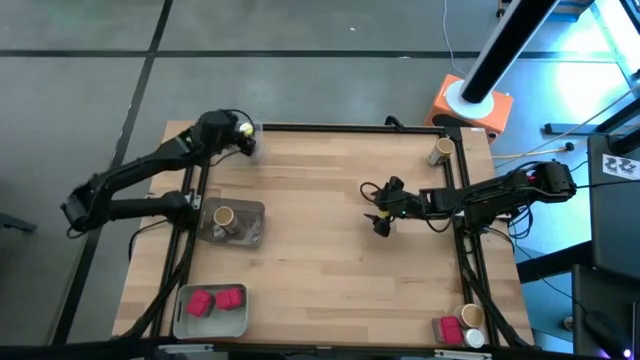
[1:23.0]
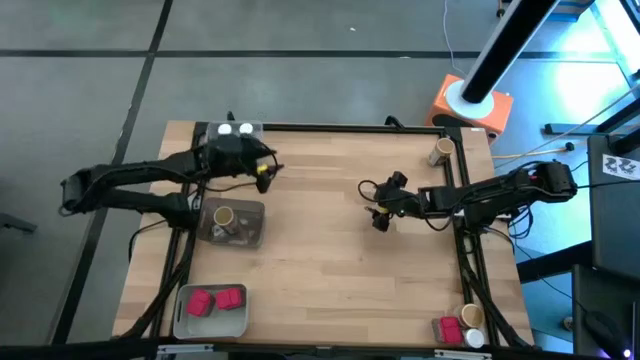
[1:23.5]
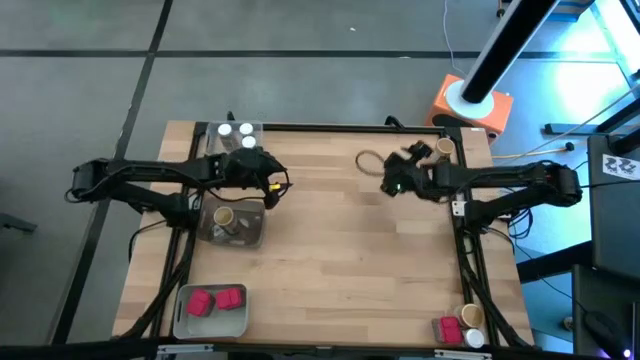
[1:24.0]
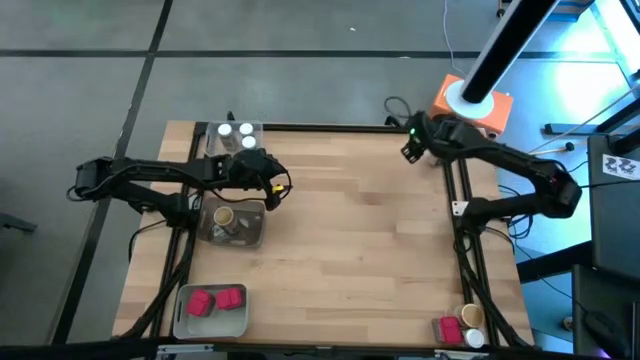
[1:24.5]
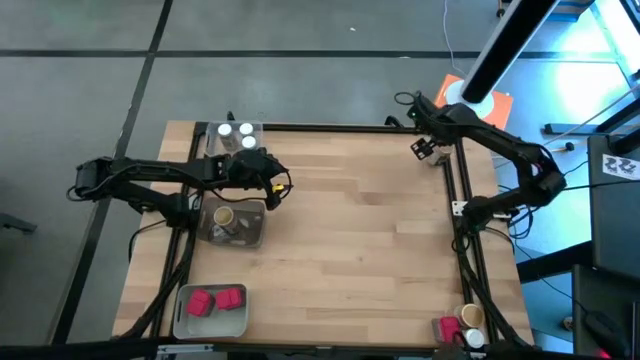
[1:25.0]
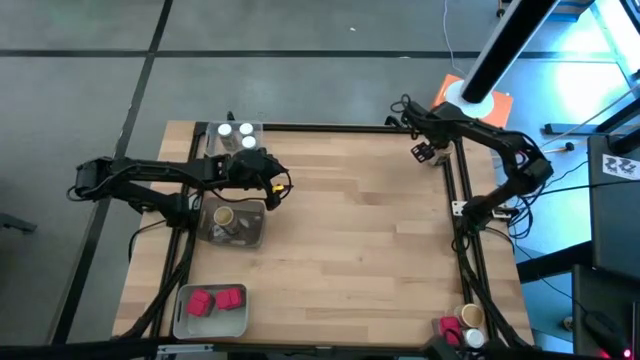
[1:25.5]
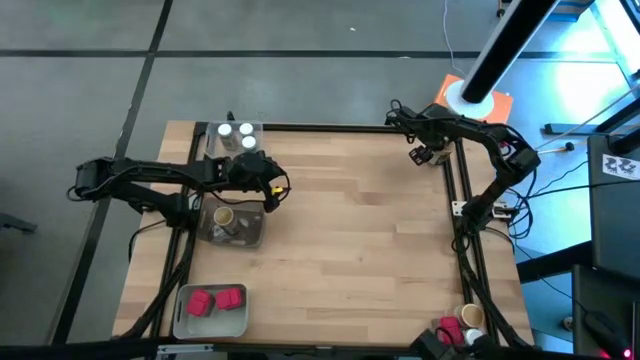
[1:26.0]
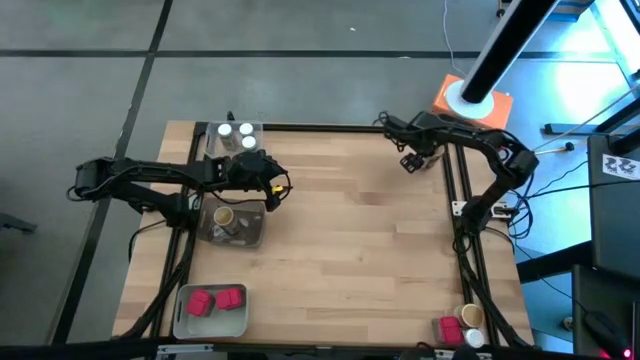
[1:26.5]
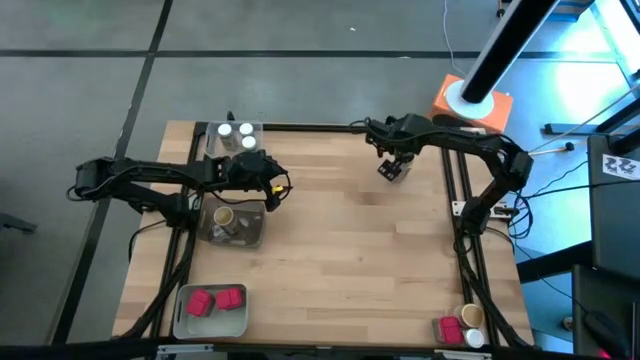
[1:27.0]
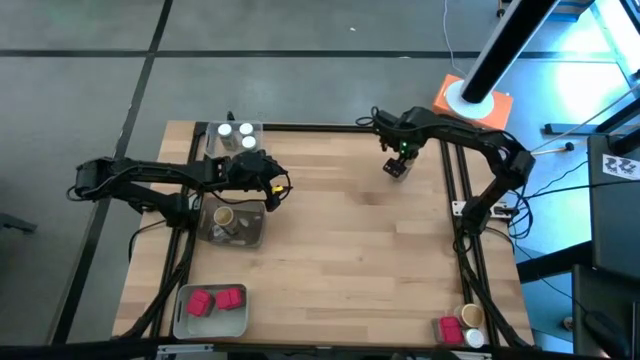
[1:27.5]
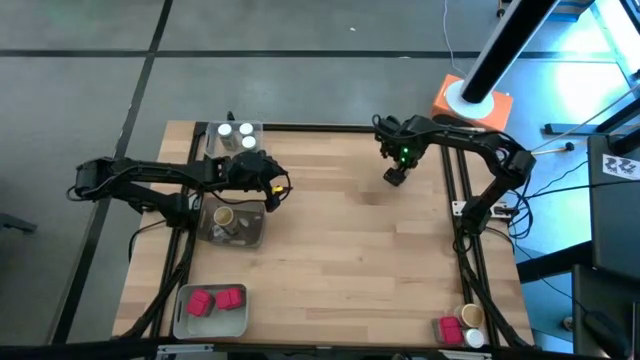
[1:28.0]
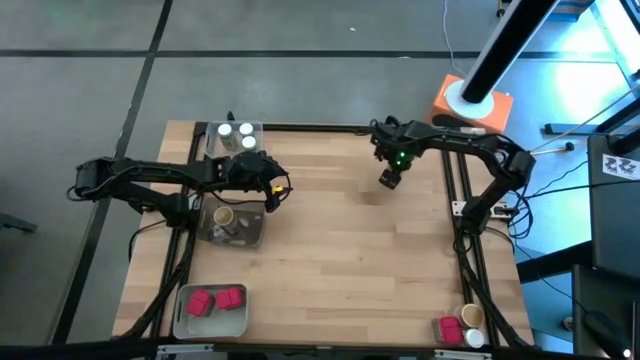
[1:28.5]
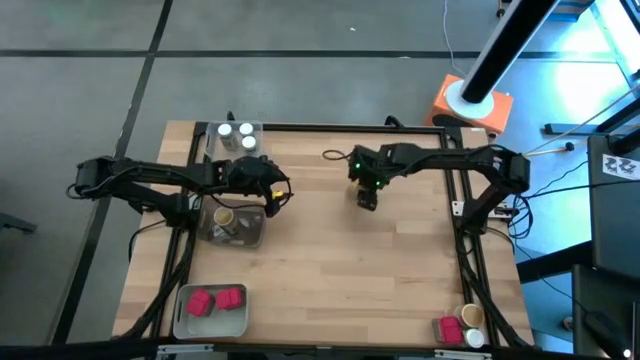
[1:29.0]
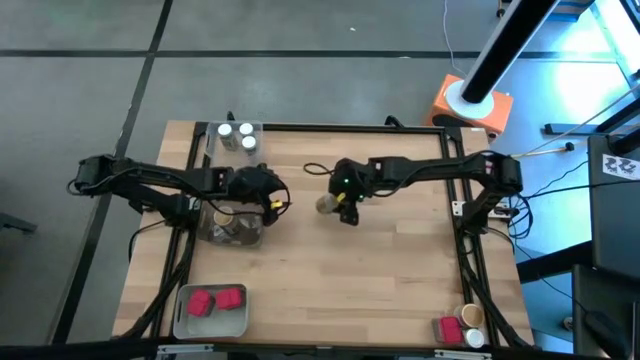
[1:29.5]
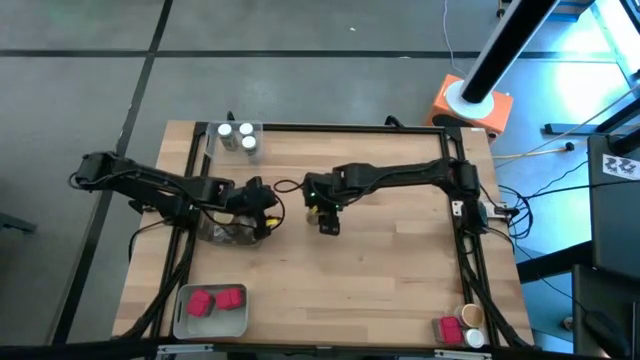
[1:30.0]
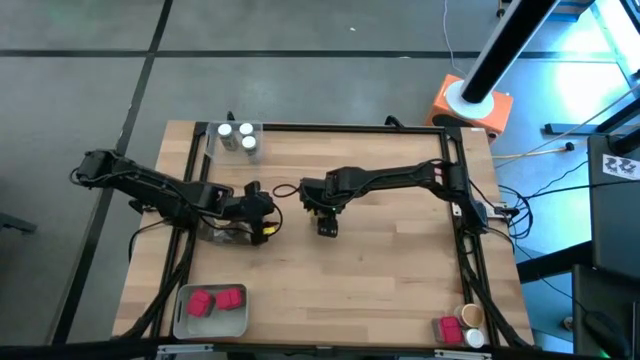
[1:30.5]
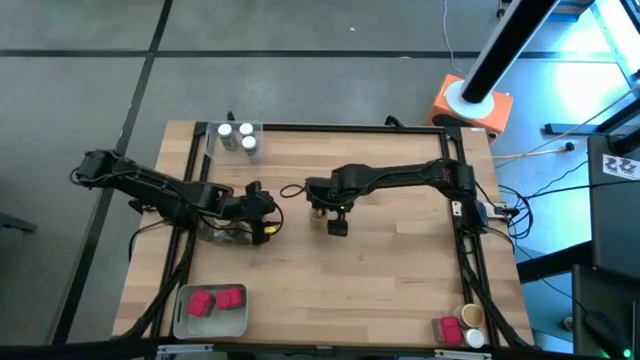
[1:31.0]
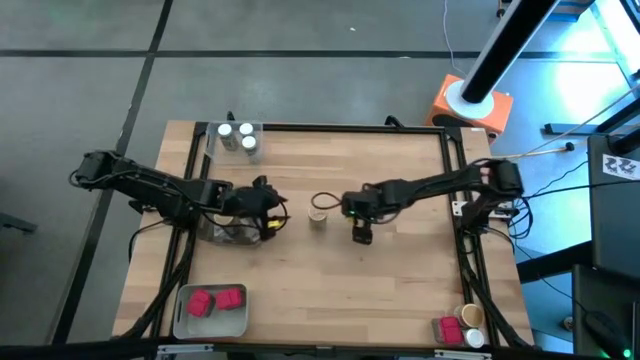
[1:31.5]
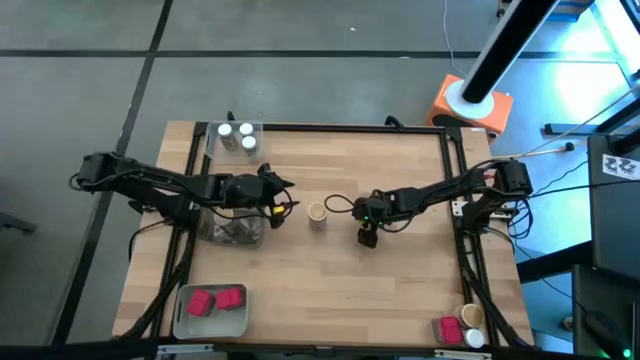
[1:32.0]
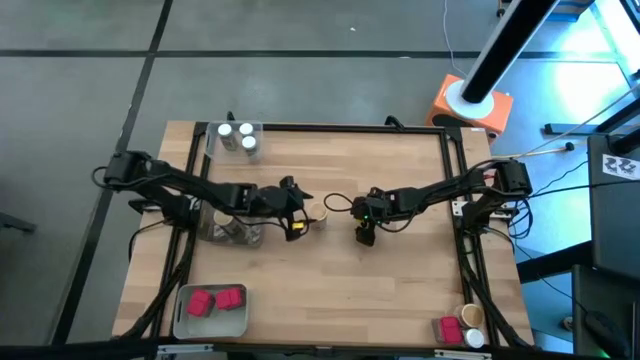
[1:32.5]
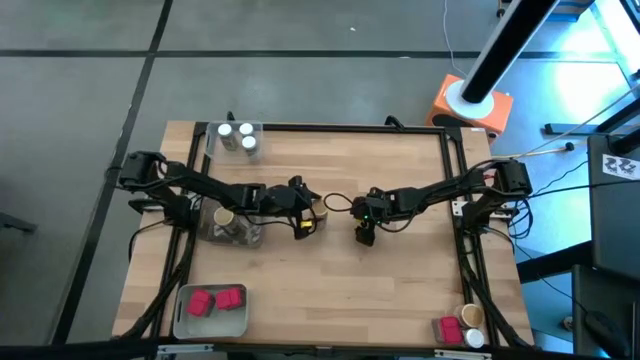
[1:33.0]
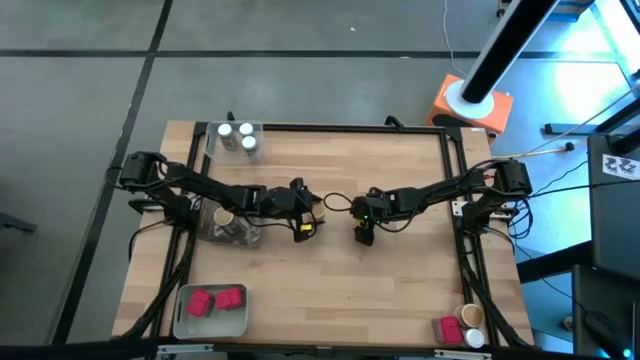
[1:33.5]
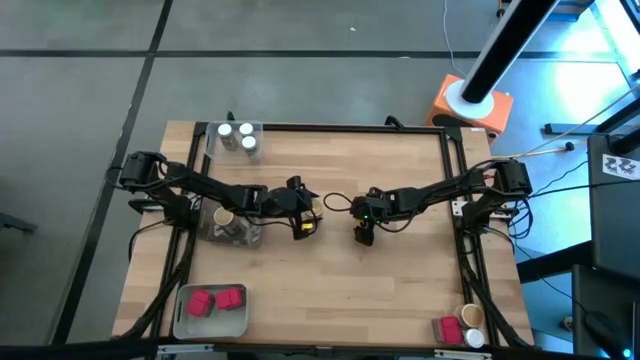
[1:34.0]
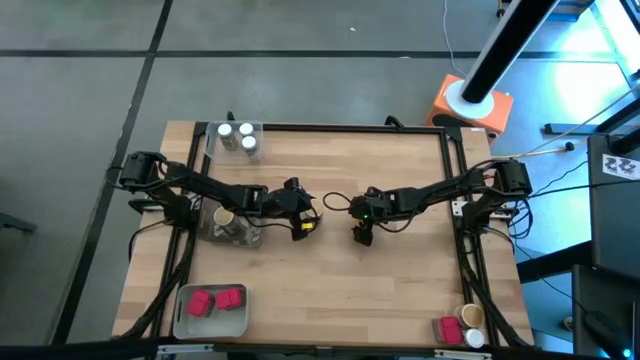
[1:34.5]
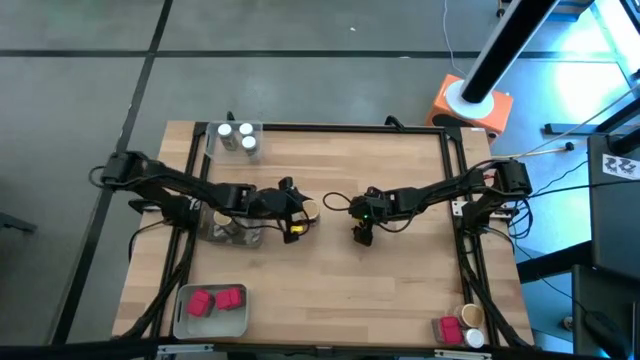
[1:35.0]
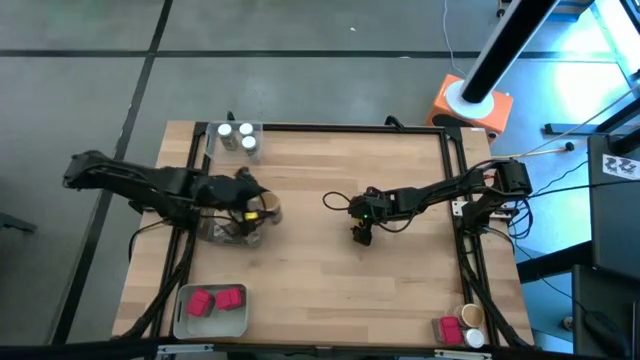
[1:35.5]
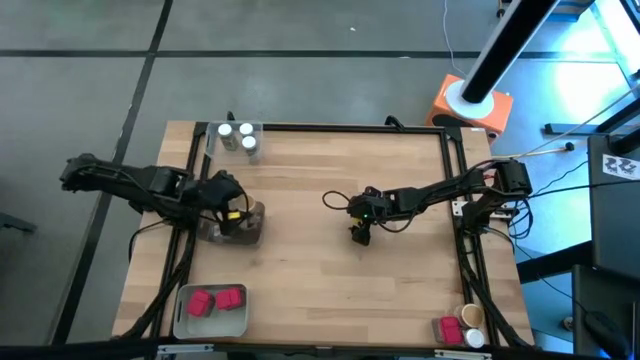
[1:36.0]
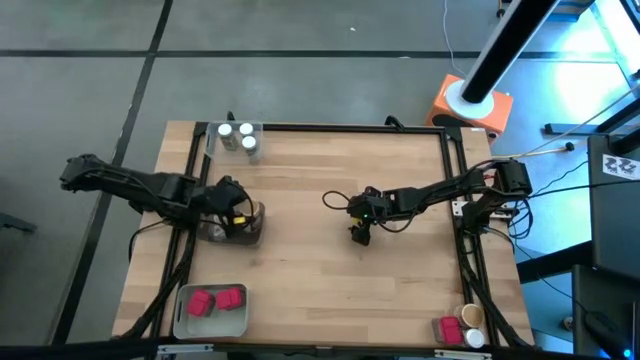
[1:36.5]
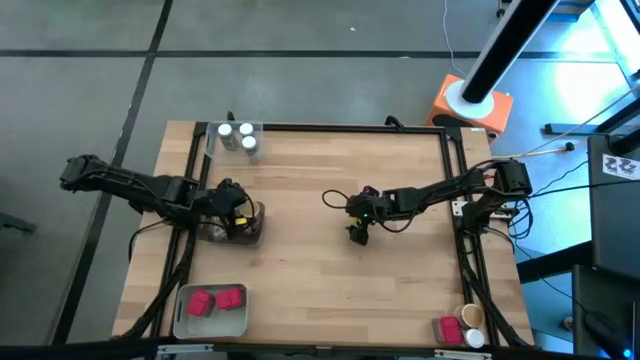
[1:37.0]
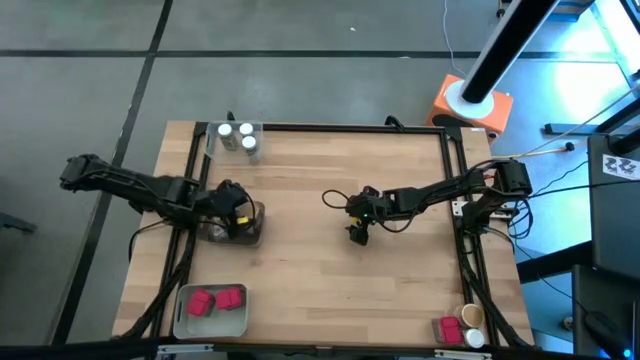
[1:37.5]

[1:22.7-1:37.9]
Task: Sort spices by type
Put the top brown spice bottle into the black bin

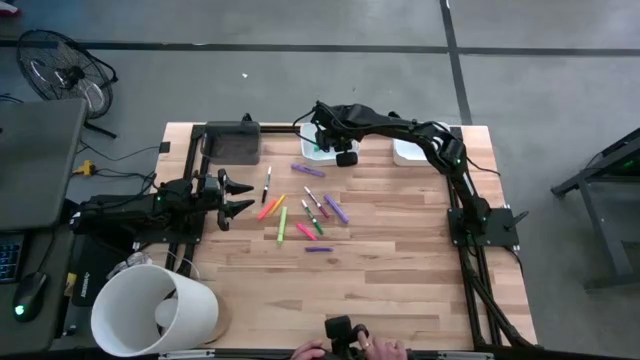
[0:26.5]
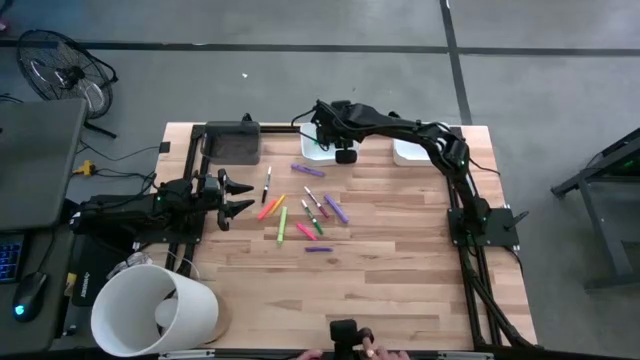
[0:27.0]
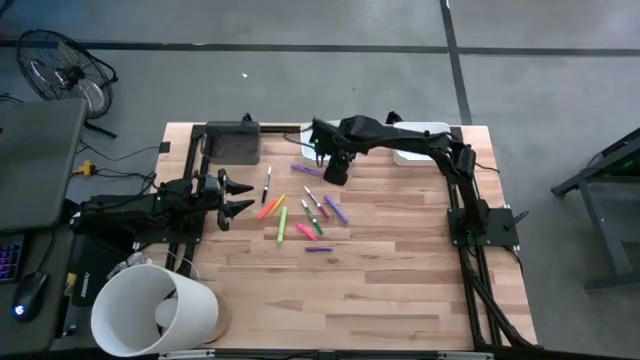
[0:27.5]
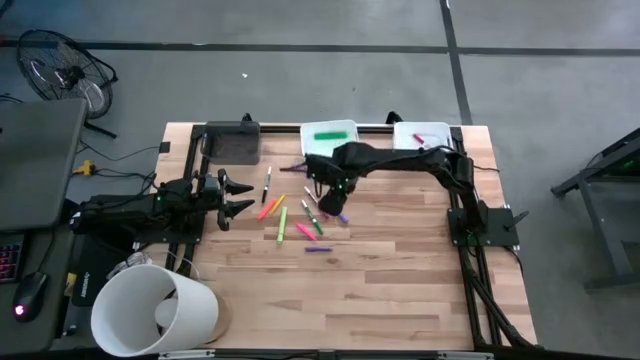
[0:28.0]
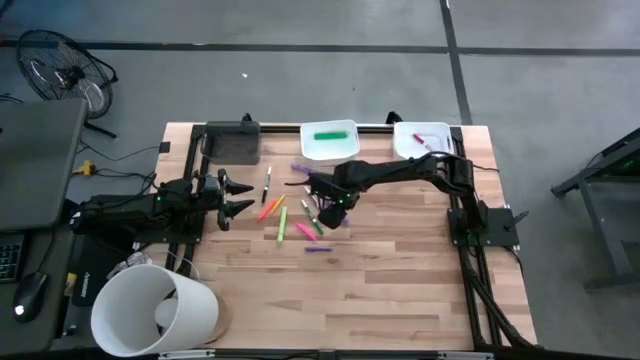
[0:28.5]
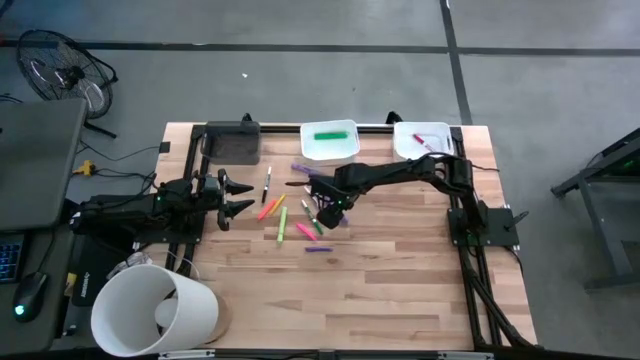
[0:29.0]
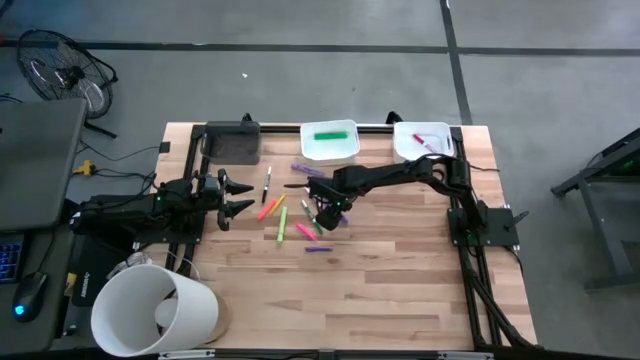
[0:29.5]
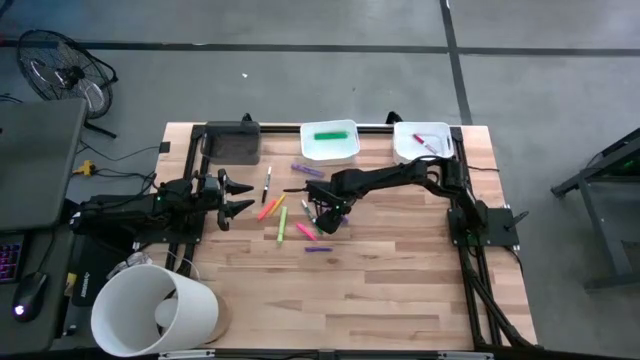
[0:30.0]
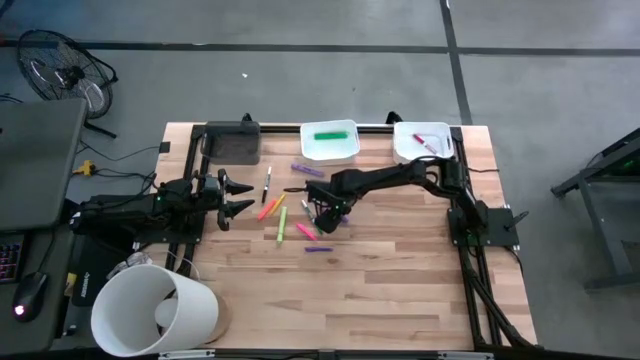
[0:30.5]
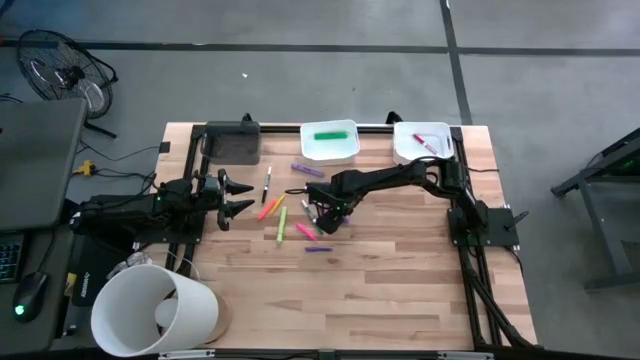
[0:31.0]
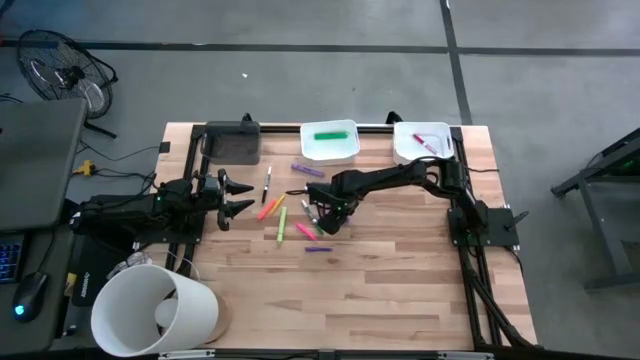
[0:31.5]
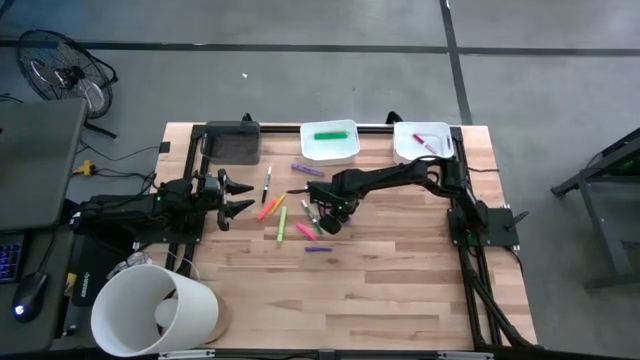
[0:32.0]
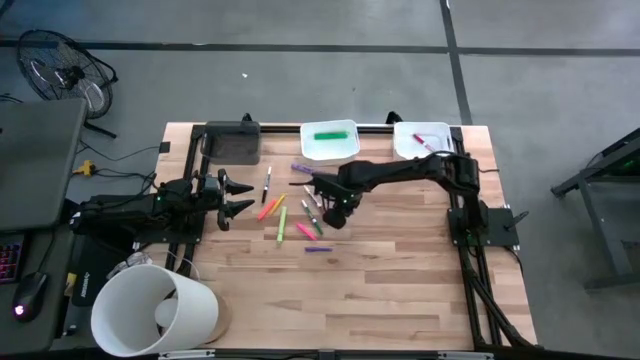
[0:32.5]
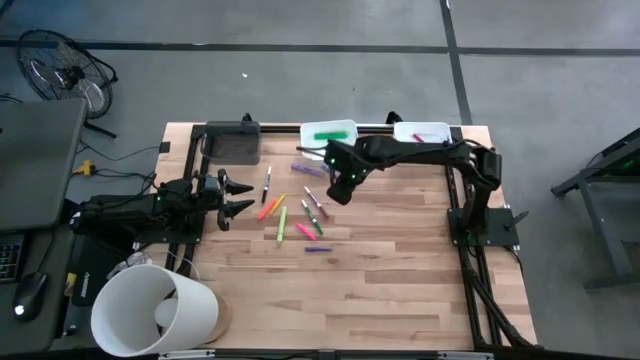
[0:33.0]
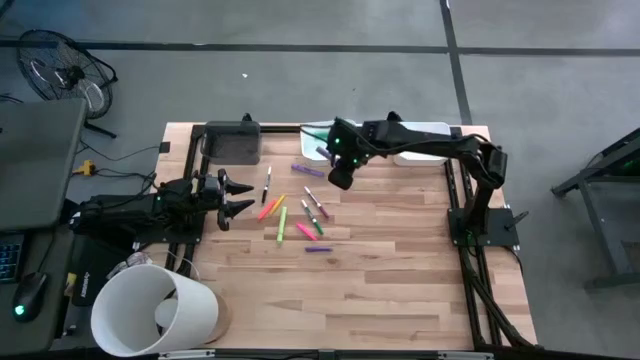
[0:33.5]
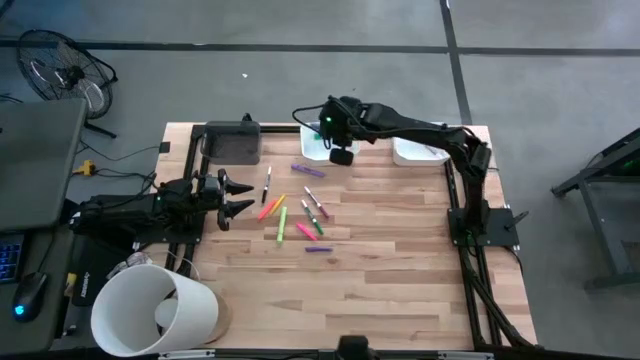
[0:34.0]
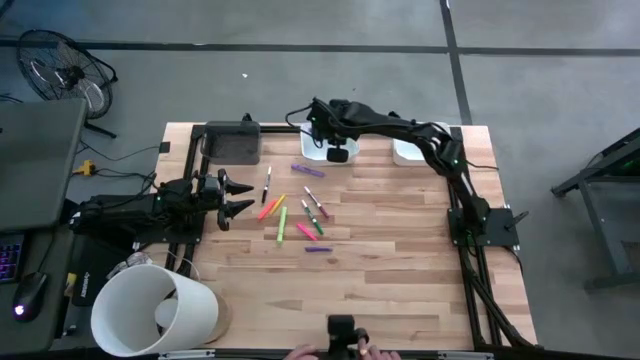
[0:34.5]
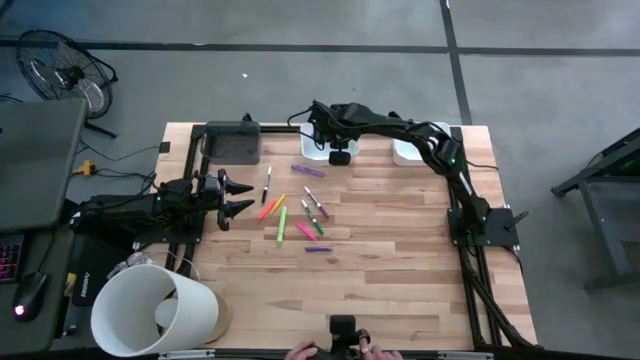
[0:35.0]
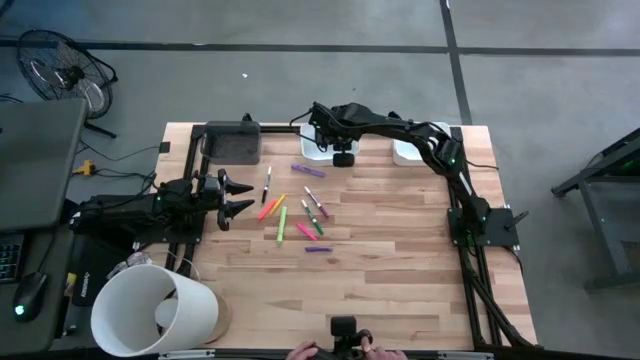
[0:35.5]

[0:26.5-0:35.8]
Task: Pick & Place Markers
Put the bottom violet highlighter pen into the left white bin
